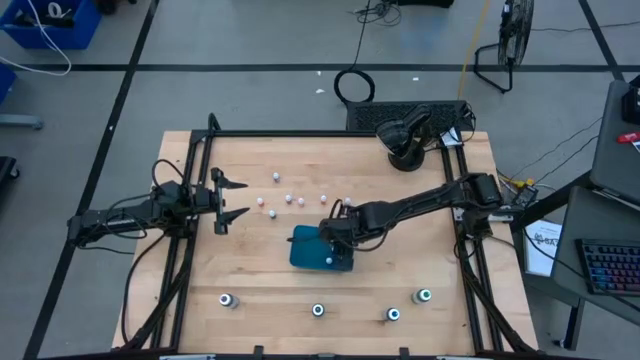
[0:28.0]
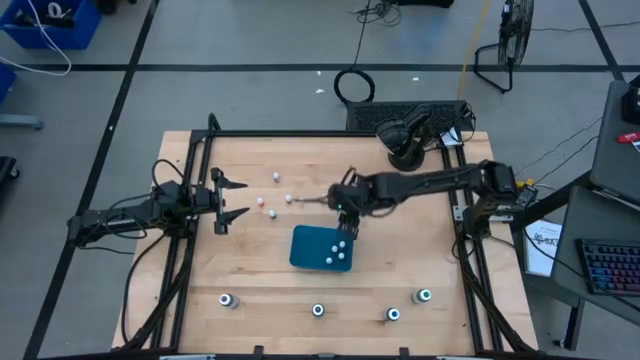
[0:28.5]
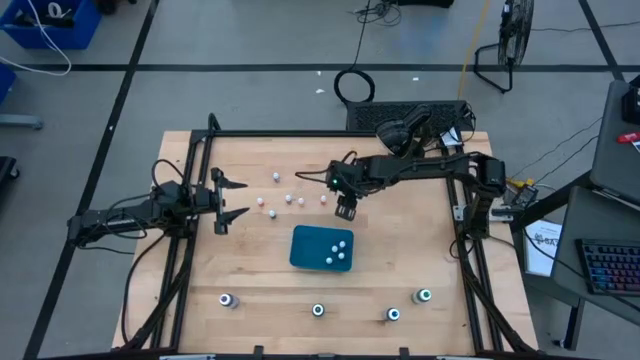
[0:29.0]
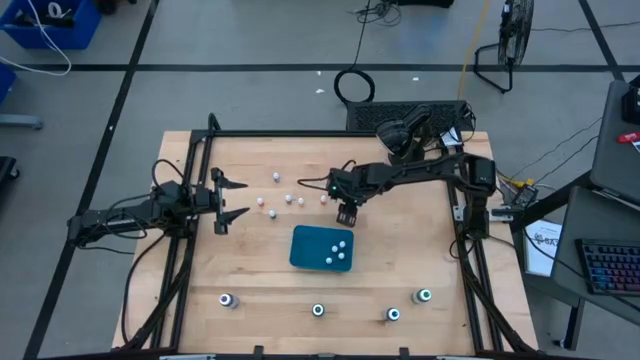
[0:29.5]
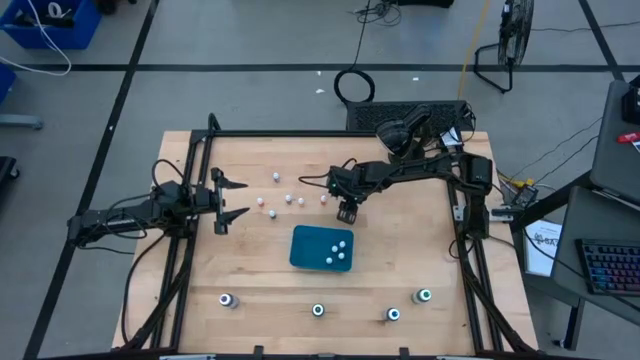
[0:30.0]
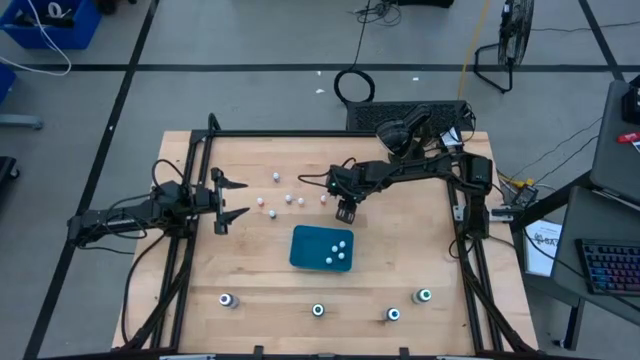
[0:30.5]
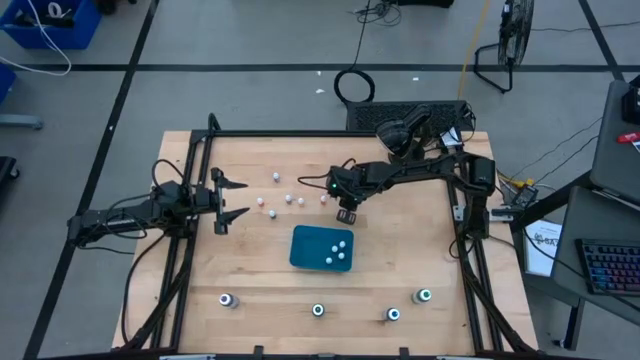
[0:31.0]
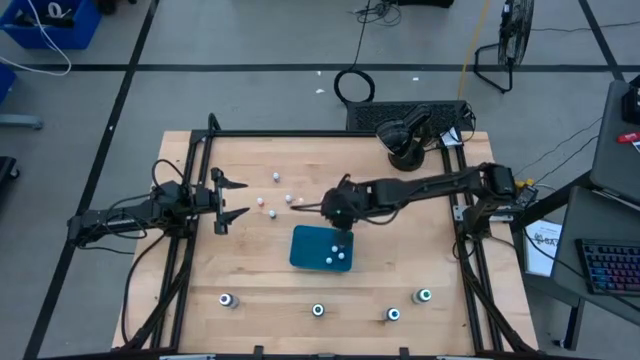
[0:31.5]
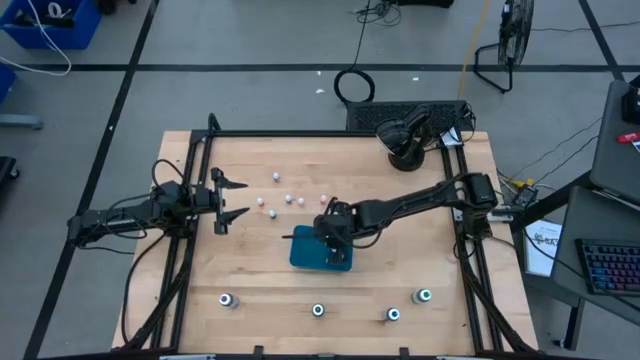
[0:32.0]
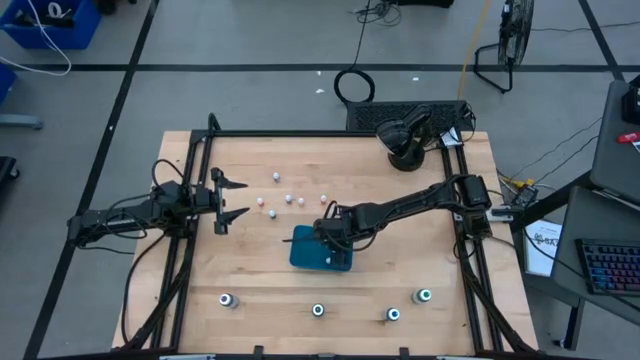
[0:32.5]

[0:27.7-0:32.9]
Task: Pick & Place food coloring
Put the green food coloring bottle into the blue bin

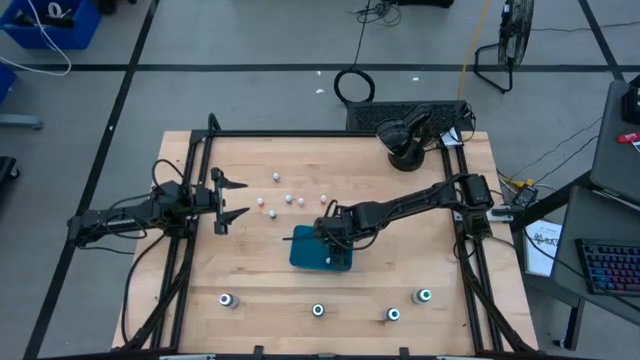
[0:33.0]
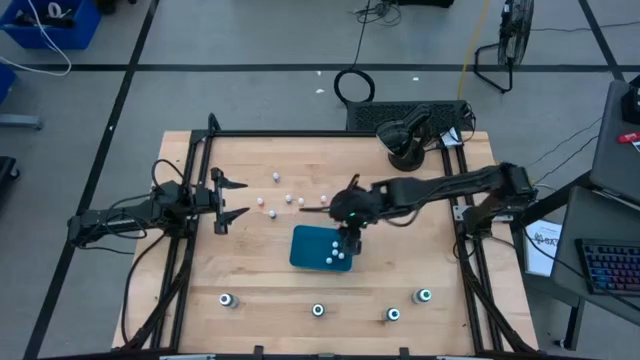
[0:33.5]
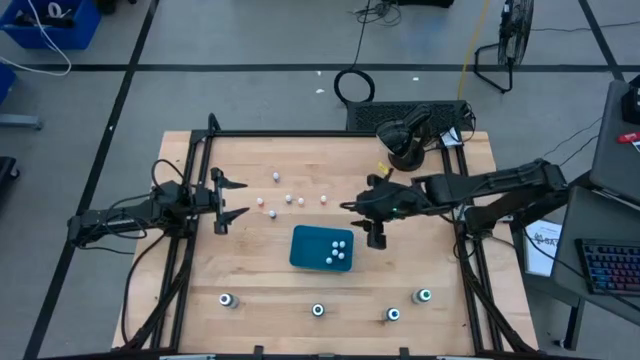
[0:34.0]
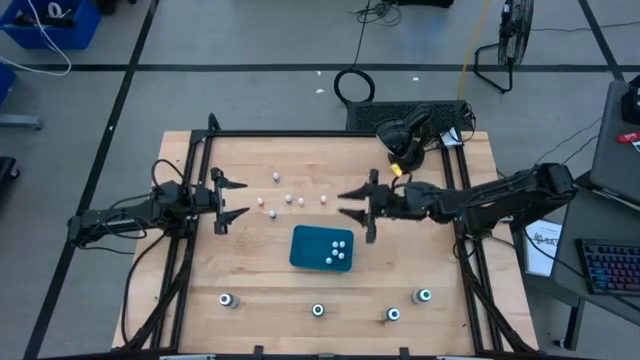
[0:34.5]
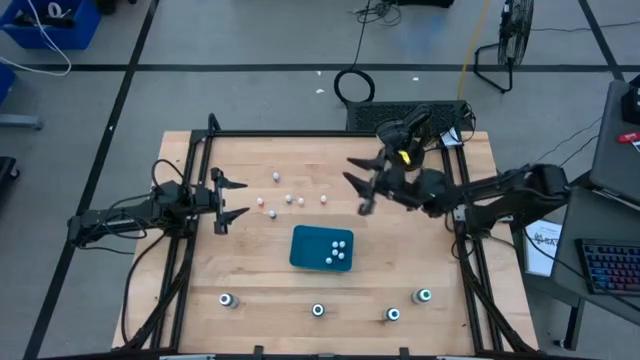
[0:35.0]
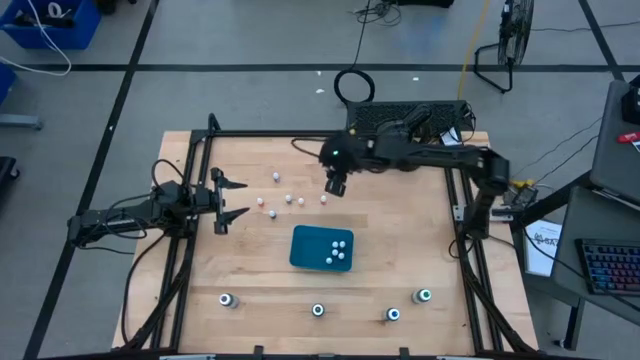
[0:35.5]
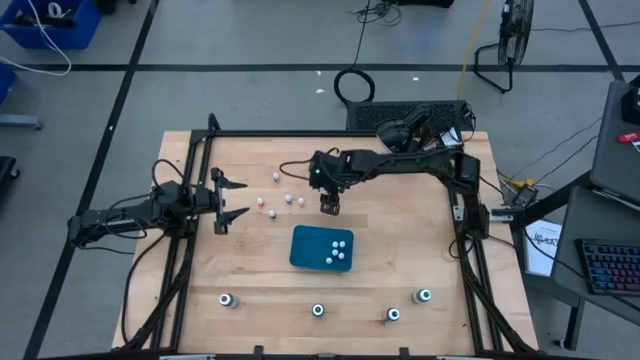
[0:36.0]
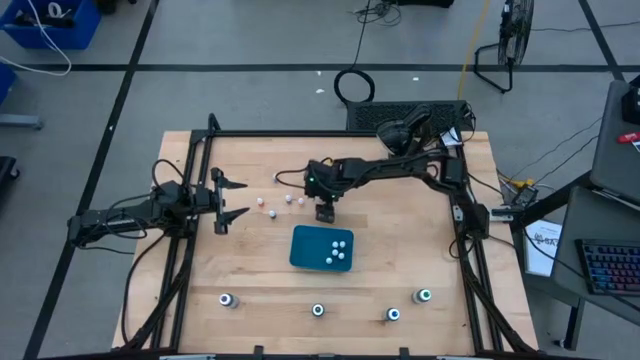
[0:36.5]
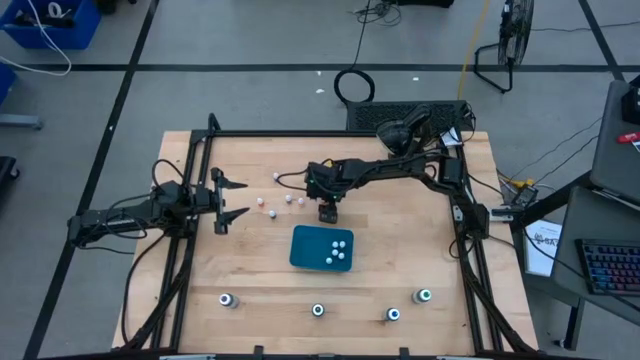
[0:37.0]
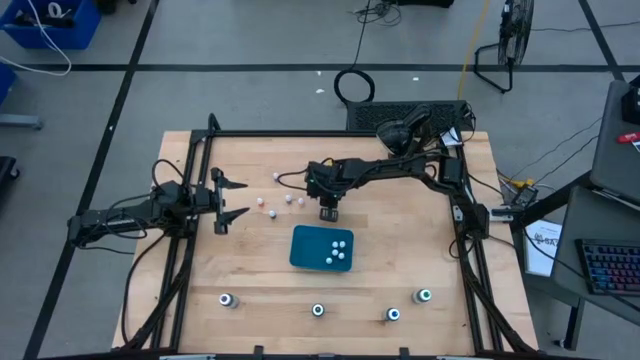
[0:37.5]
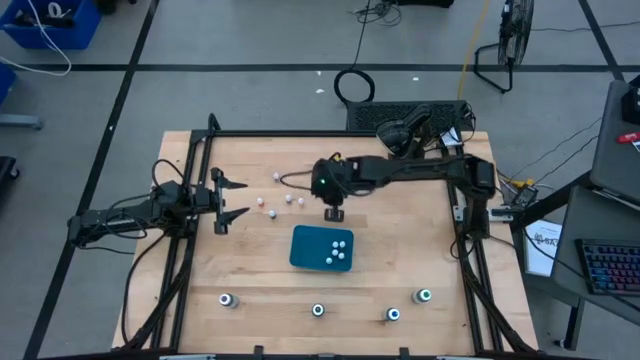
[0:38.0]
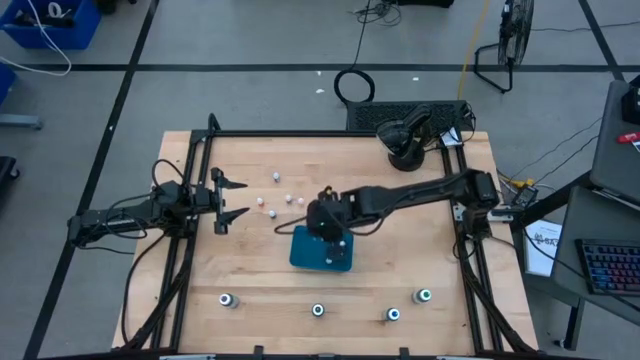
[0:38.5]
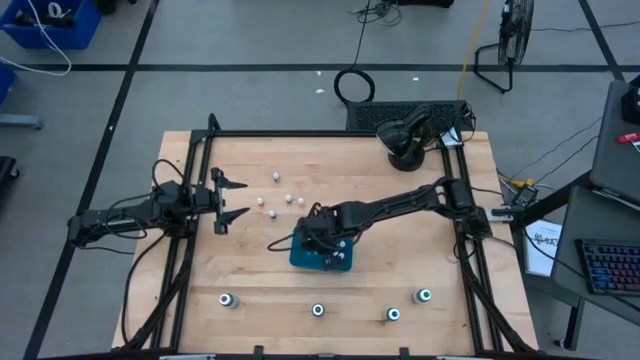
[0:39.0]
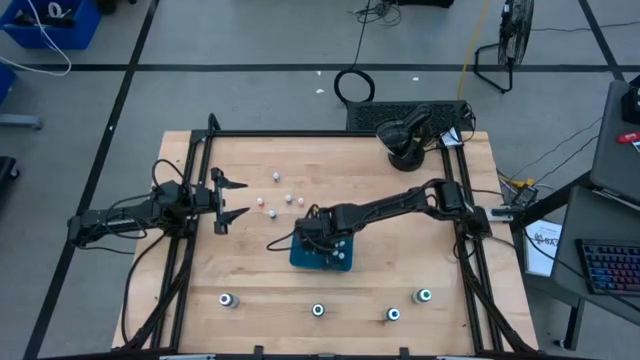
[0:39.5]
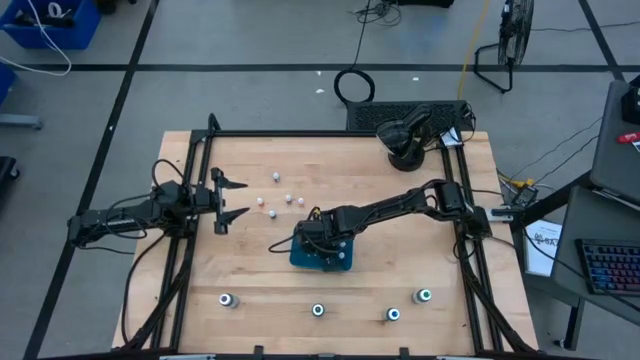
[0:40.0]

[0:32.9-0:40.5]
Put the orange food coloring bottle into the blue bin

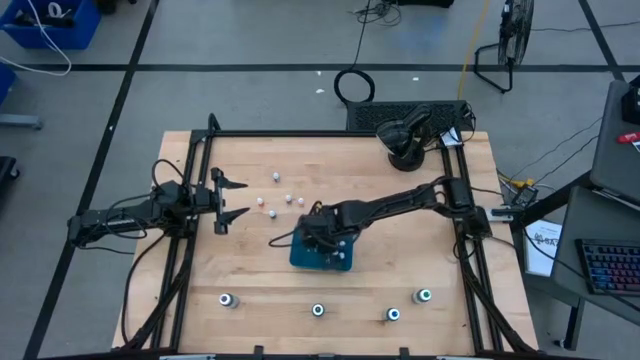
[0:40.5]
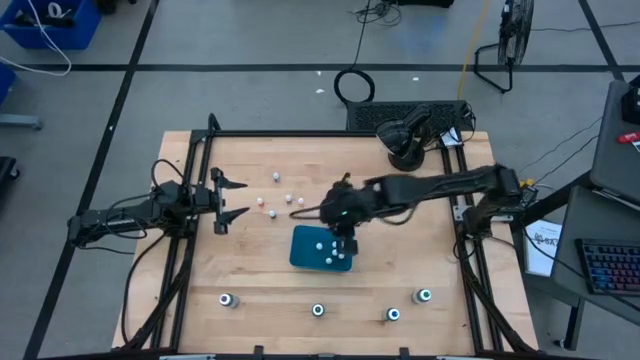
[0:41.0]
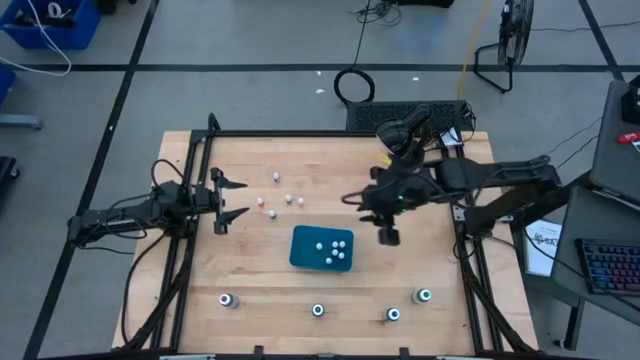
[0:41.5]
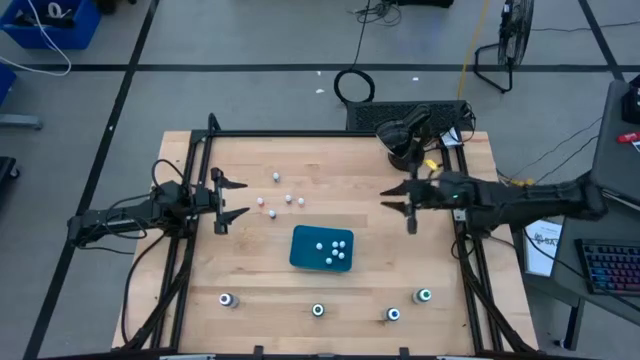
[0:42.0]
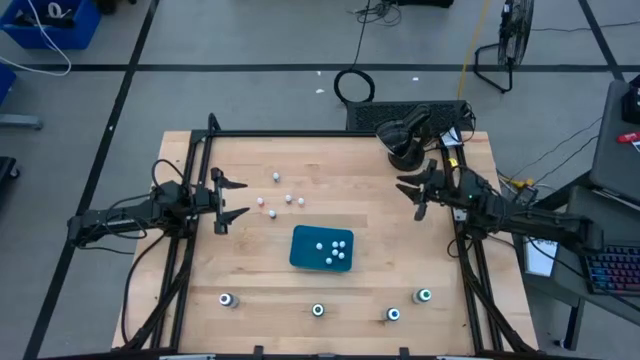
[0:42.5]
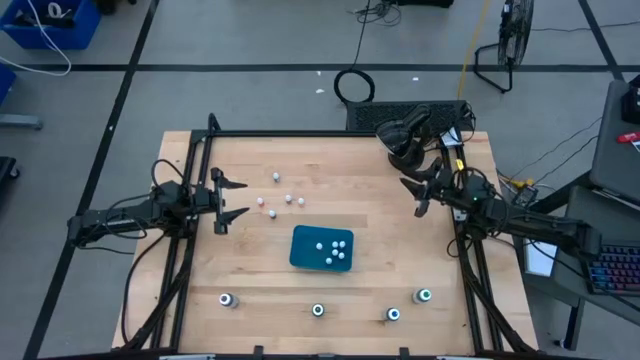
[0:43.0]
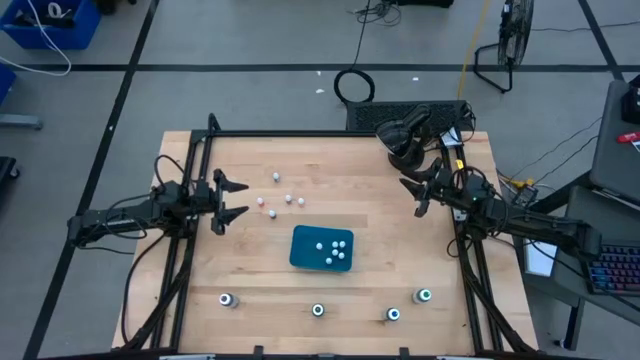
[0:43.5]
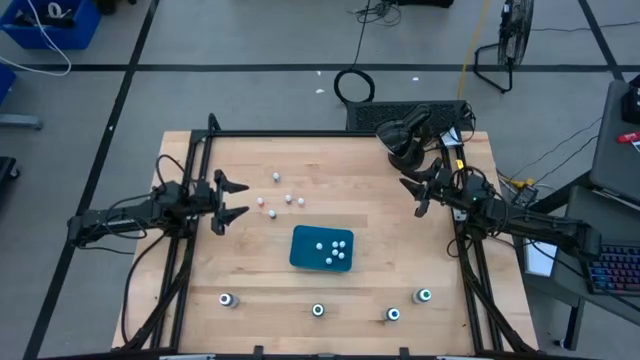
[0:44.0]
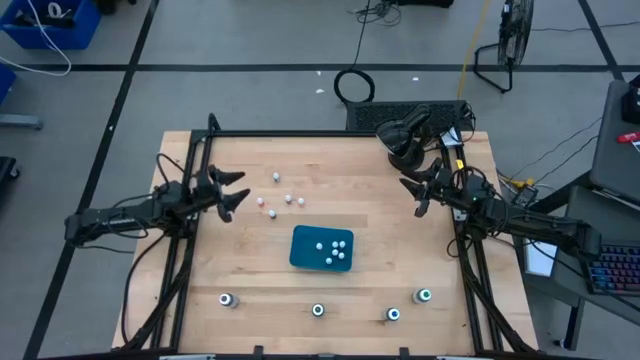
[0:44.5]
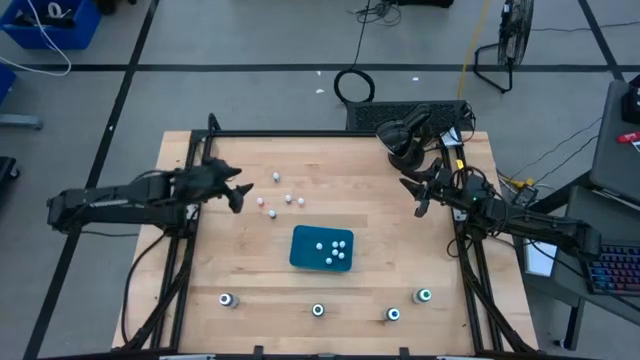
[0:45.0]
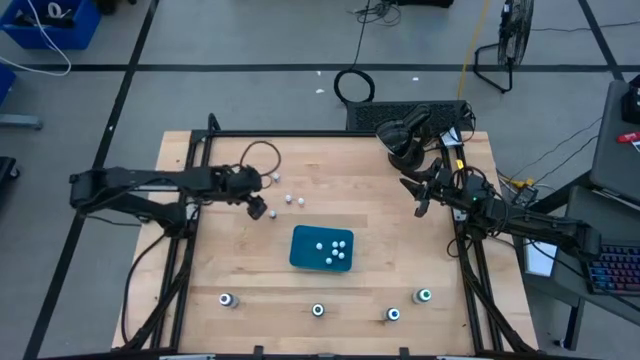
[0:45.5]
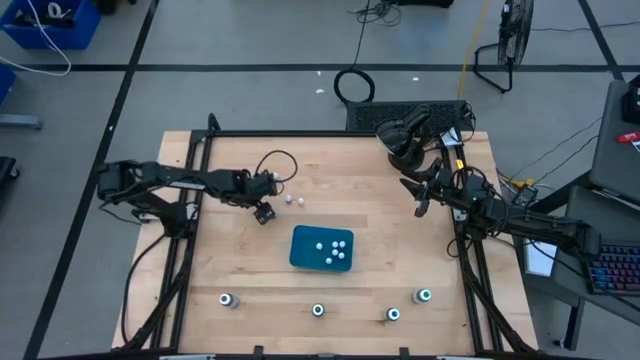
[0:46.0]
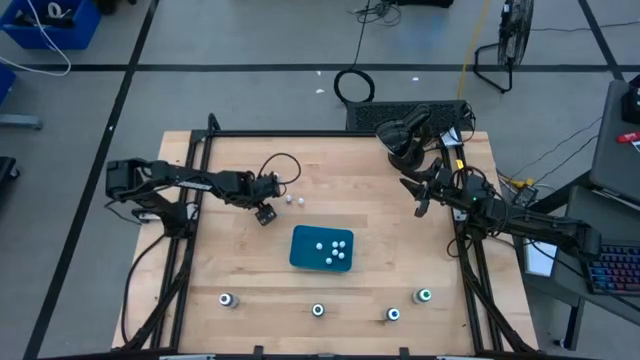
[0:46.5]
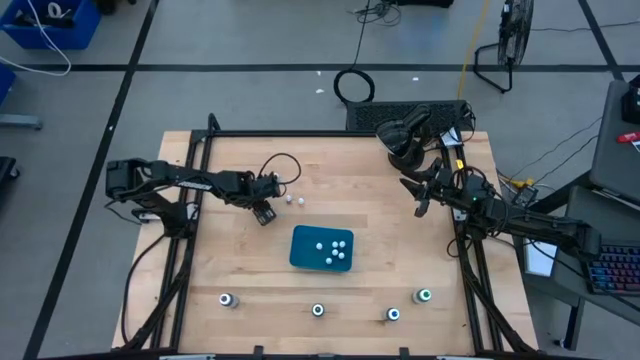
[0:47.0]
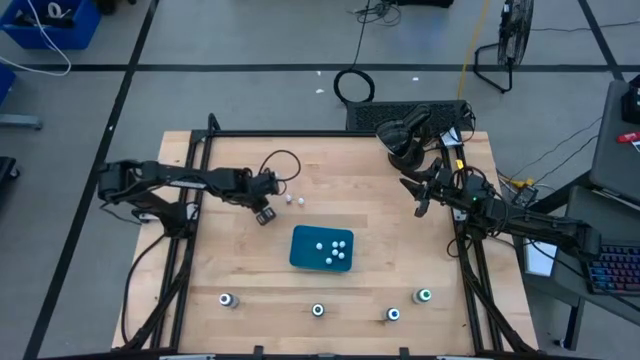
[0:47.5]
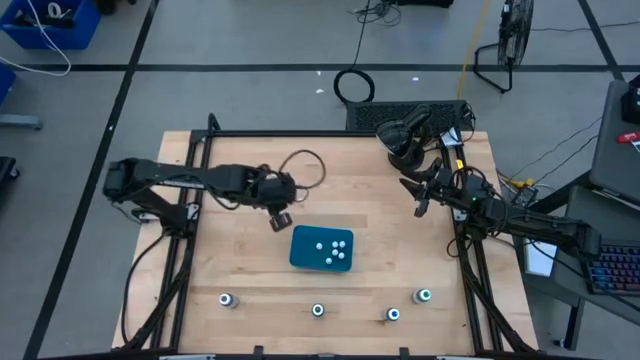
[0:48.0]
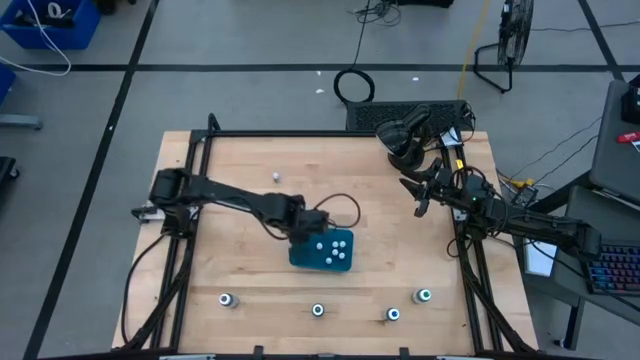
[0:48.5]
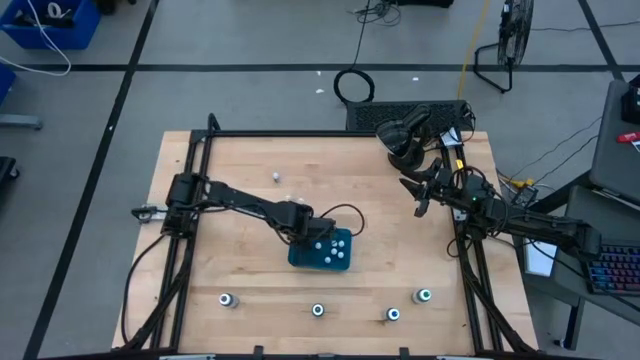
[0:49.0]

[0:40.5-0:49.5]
Put the orange food coloring bottle into the blue bin

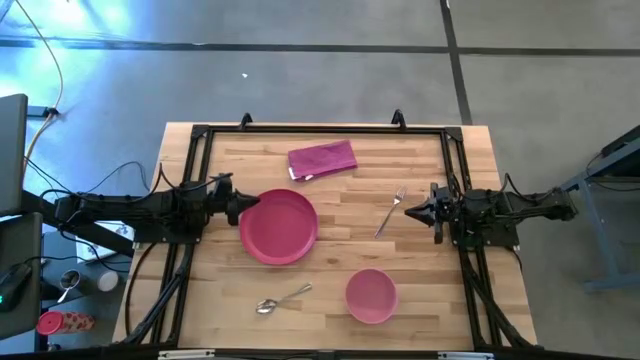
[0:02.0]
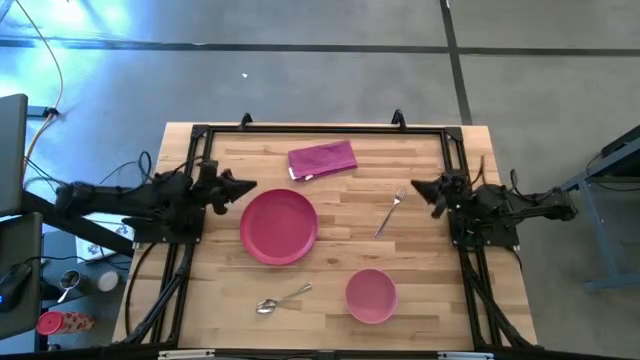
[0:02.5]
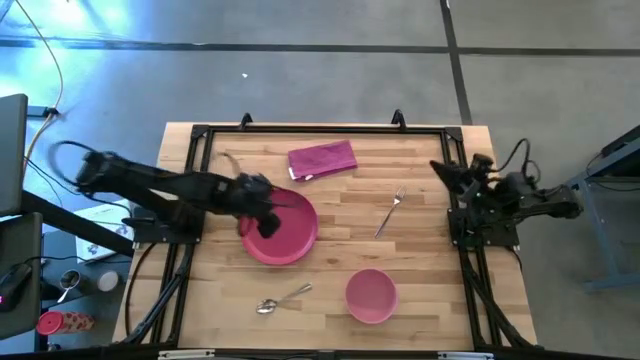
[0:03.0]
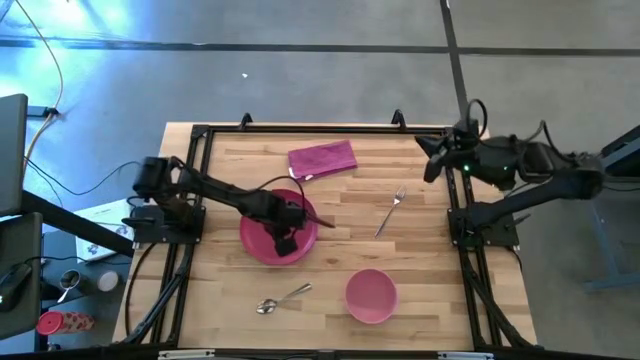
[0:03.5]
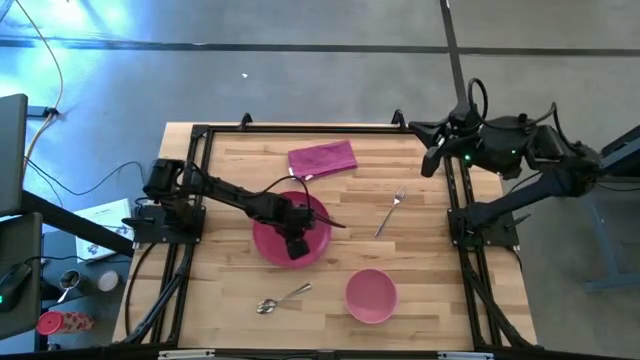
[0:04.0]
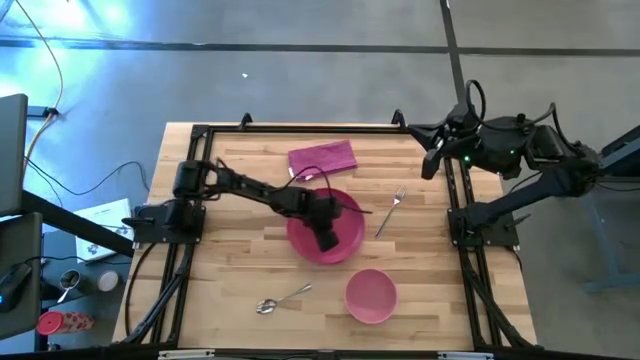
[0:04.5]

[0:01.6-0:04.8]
Task: Set table place
Move the red plate to the center of the table
